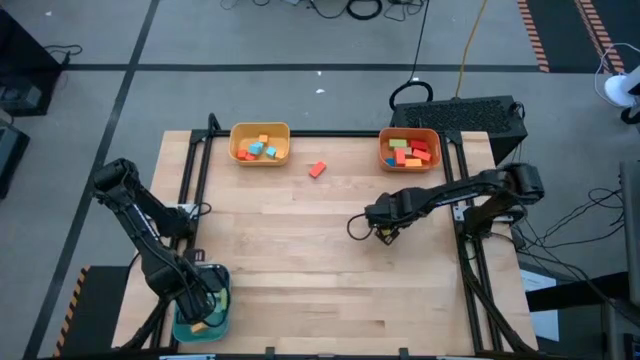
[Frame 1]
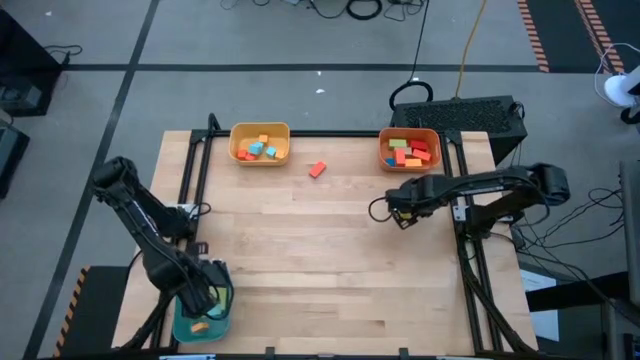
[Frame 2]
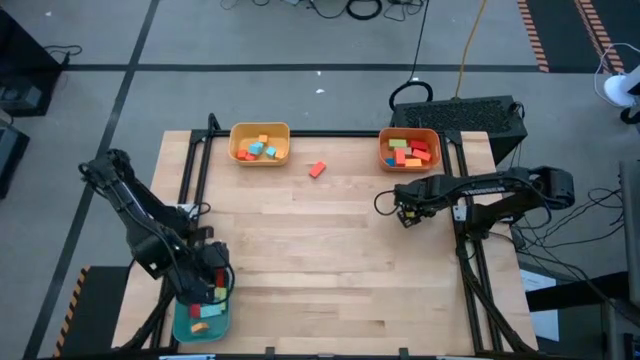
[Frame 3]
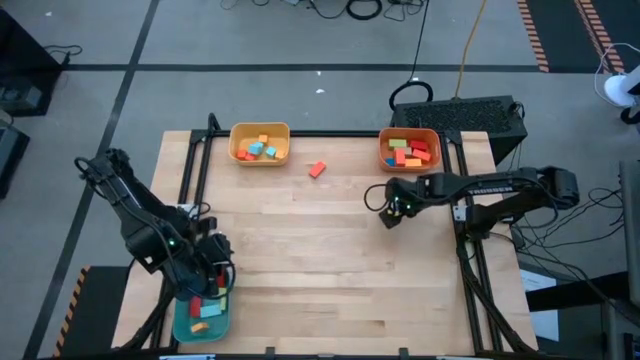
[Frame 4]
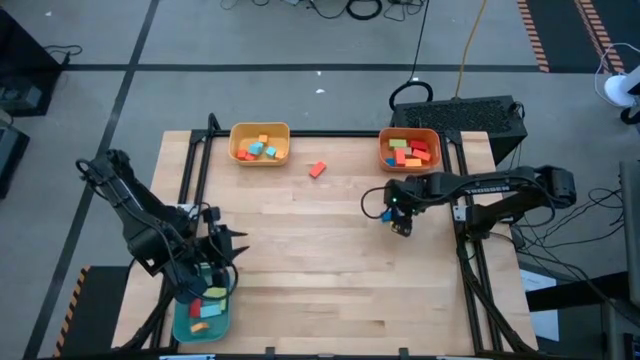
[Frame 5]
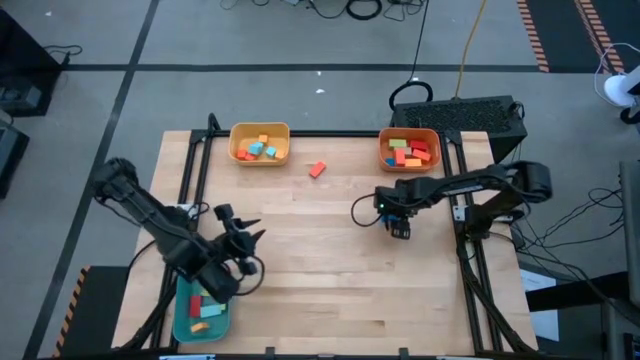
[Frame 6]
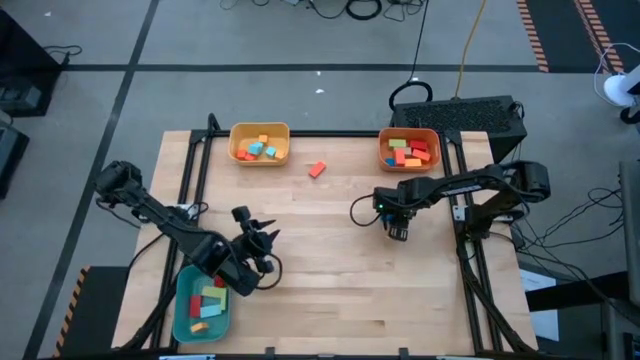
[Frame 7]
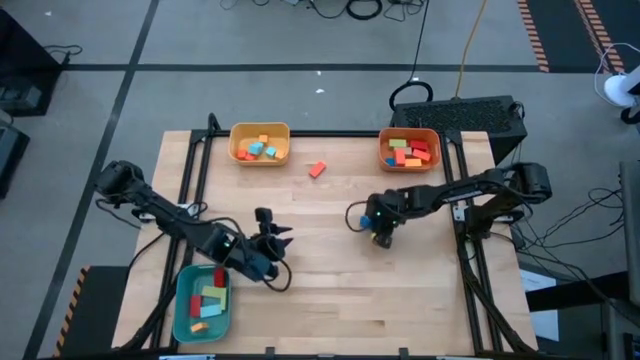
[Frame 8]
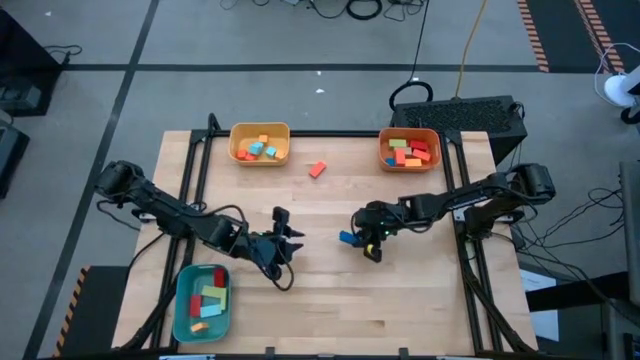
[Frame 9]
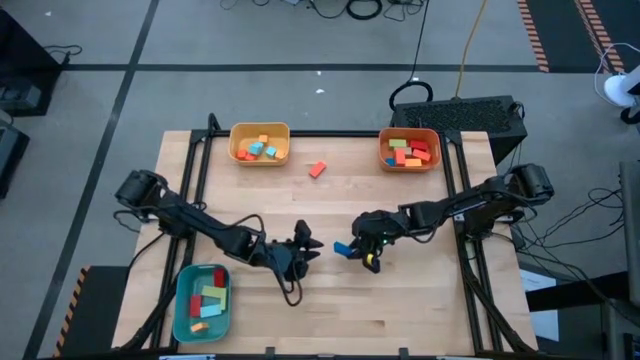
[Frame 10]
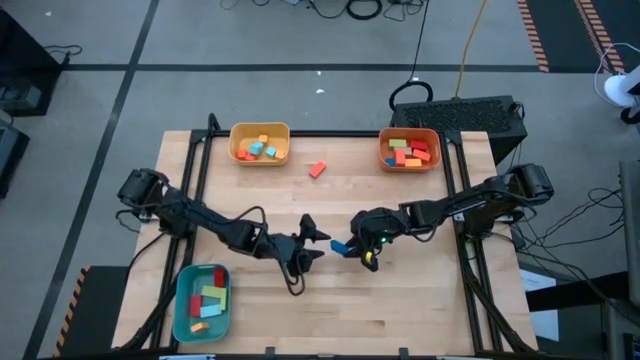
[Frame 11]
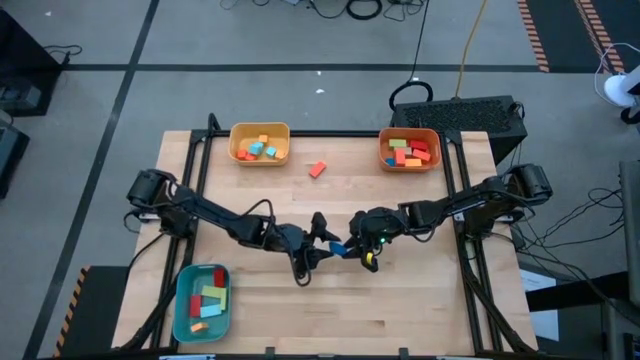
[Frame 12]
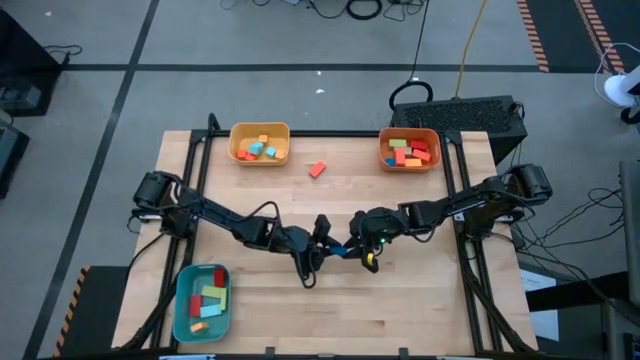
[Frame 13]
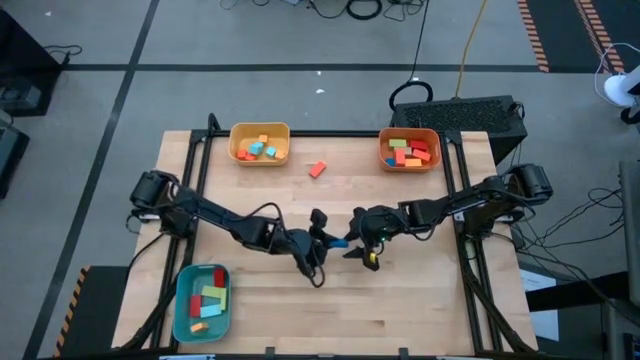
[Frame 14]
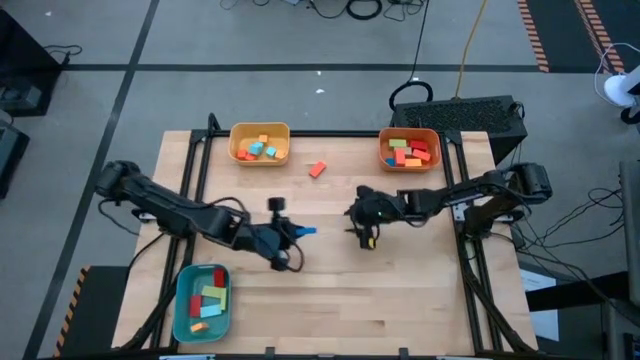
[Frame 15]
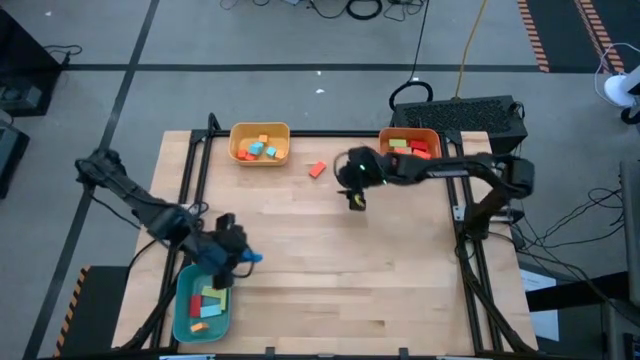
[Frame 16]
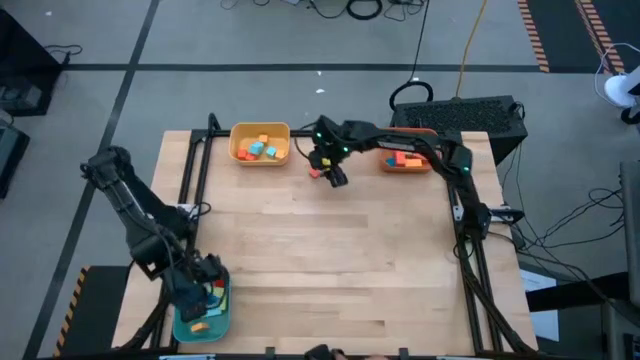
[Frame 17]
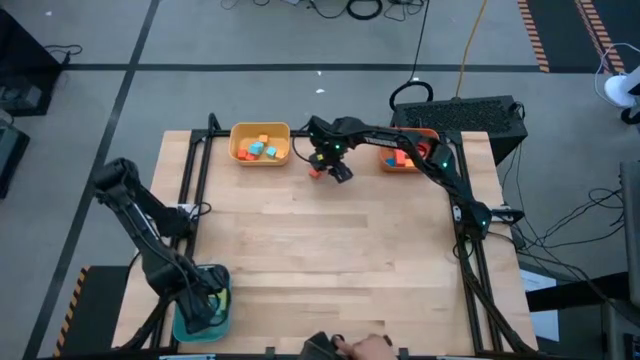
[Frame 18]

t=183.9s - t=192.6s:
Task: Sort blocks by size
Put the dark blue block into the blue bin

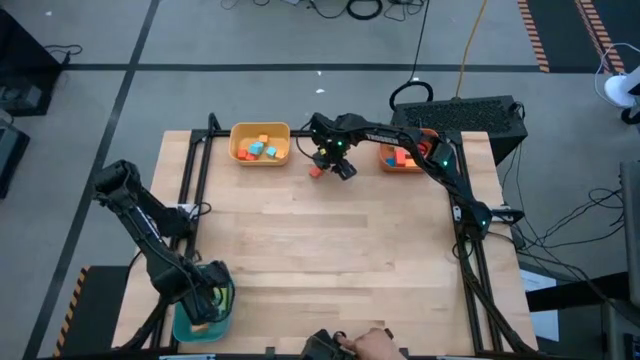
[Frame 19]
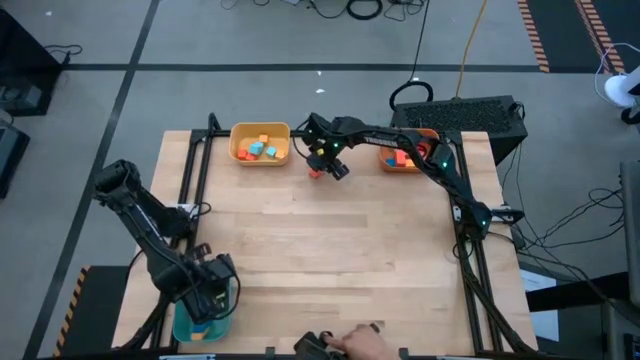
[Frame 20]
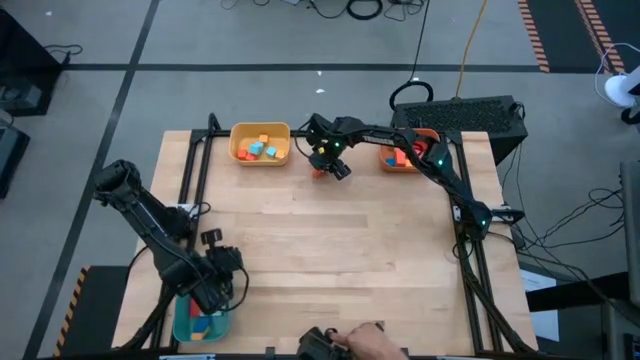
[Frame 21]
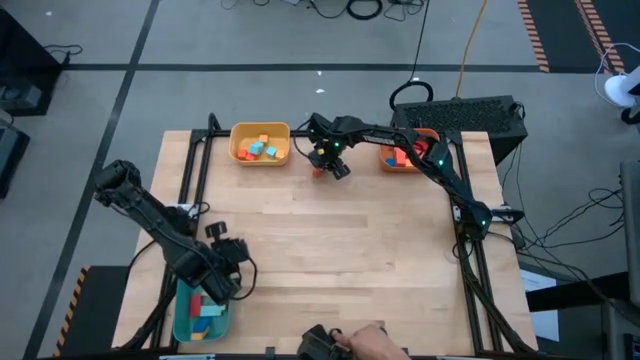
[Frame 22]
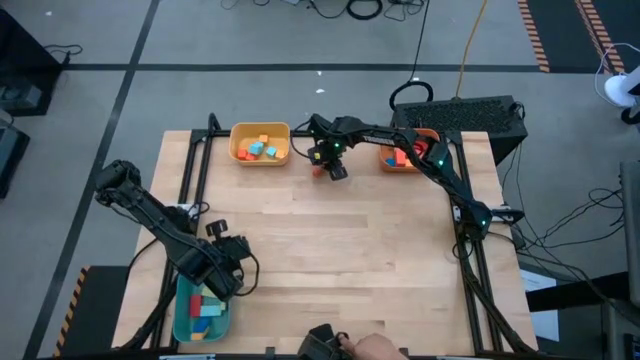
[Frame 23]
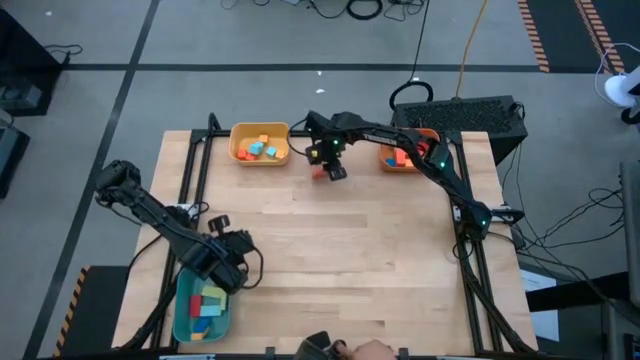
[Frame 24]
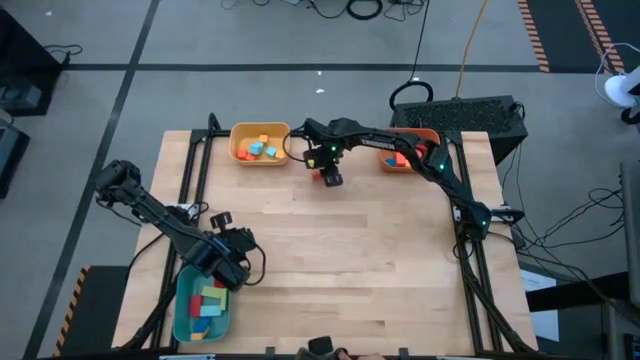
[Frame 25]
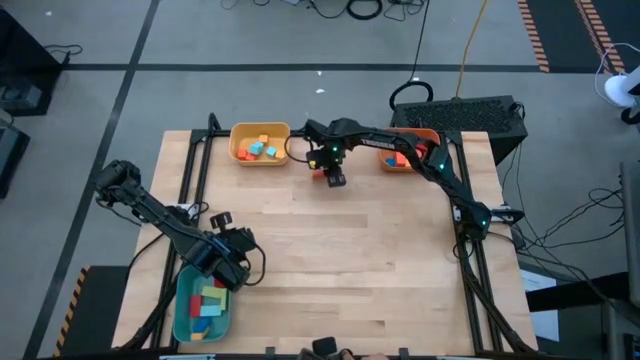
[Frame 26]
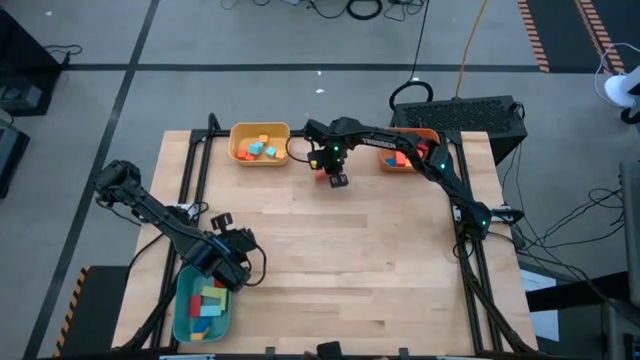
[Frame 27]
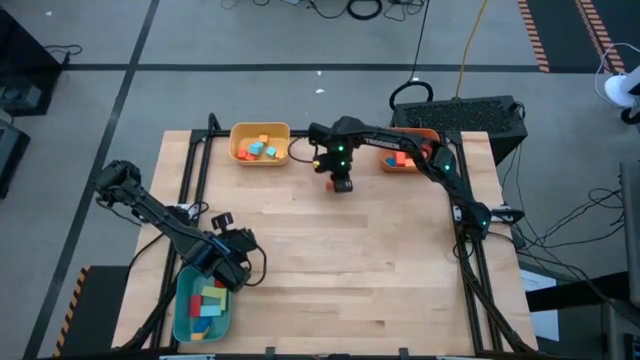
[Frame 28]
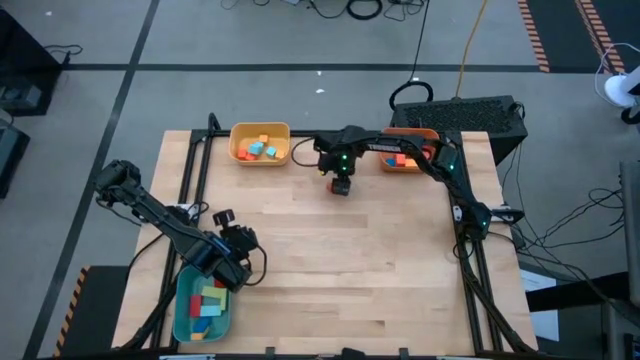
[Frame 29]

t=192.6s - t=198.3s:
Put the large orange block into the blue bin

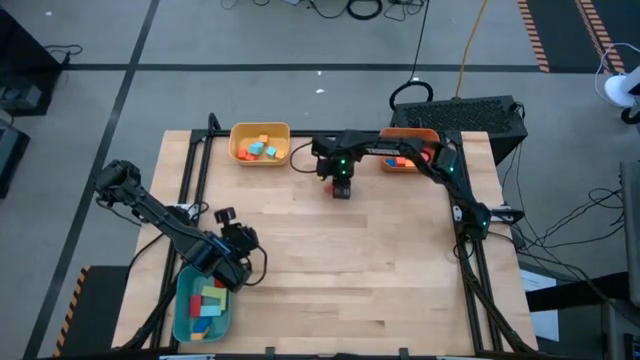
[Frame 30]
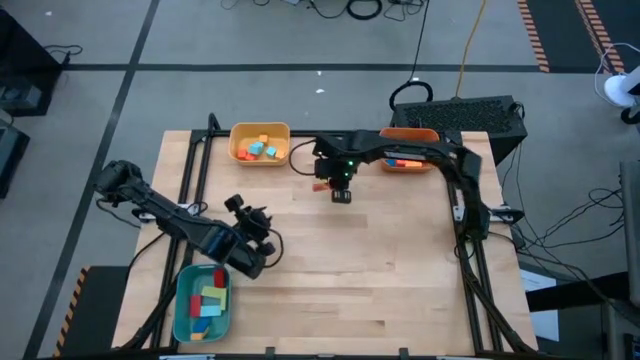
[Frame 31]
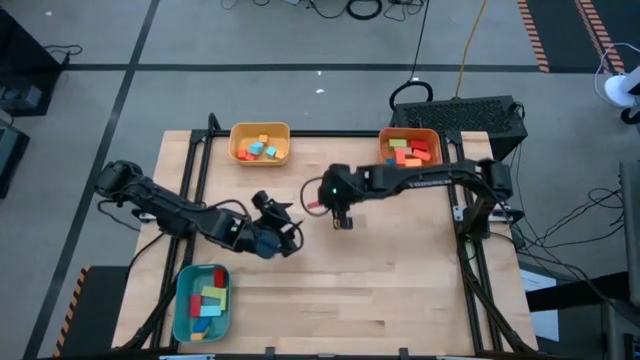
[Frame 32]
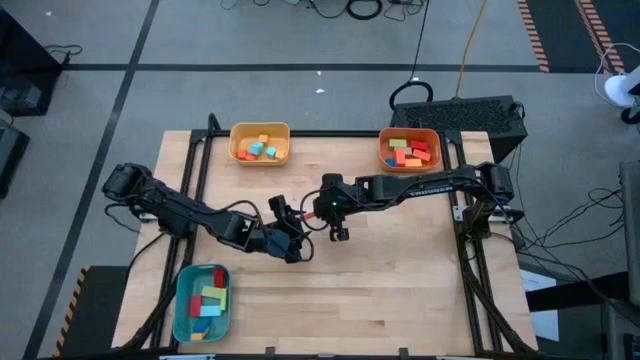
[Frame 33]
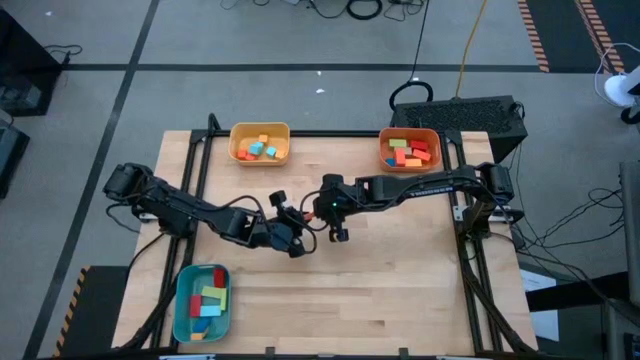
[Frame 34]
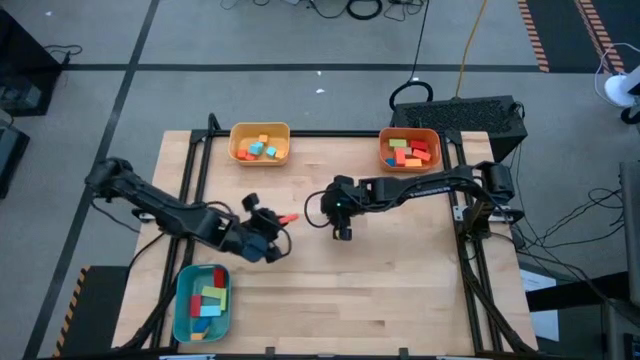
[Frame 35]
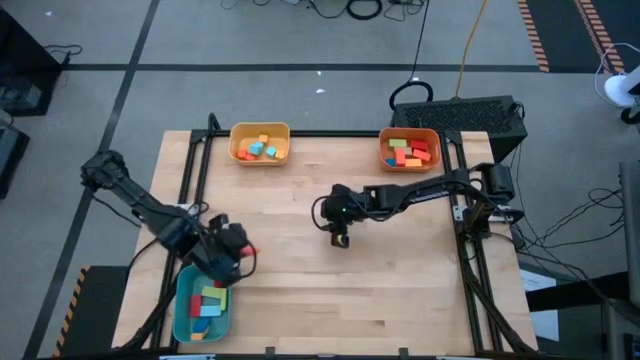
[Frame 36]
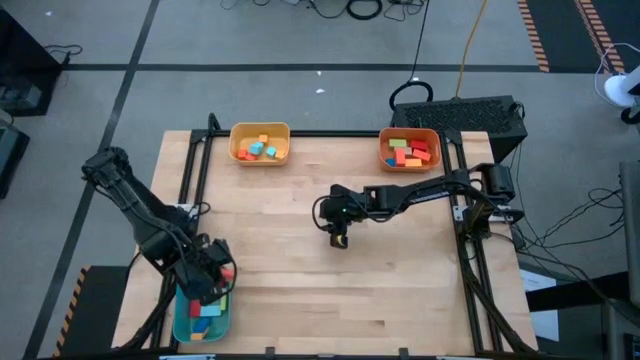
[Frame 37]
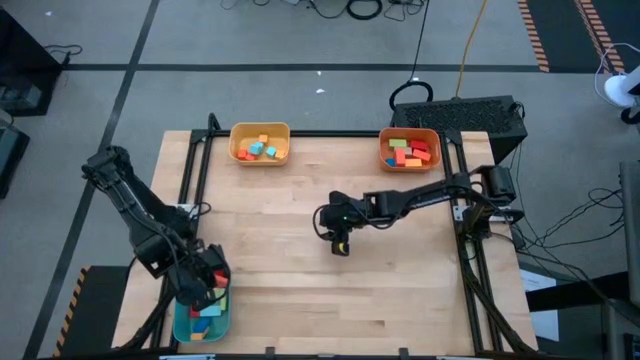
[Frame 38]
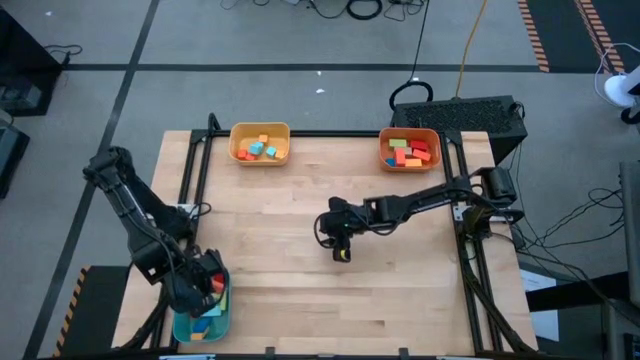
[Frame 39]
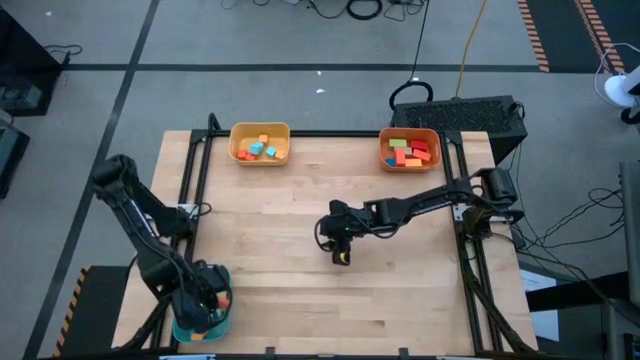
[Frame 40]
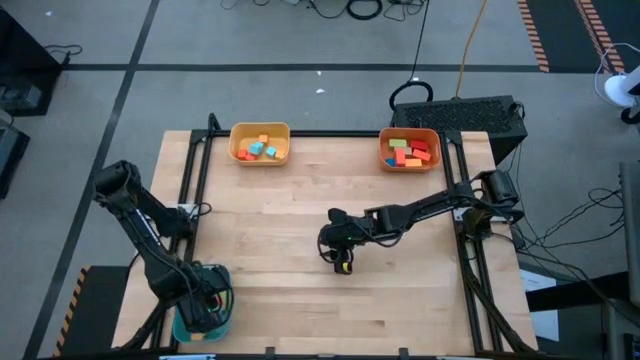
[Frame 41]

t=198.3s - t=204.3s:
Put the large orange block into the blue bin
